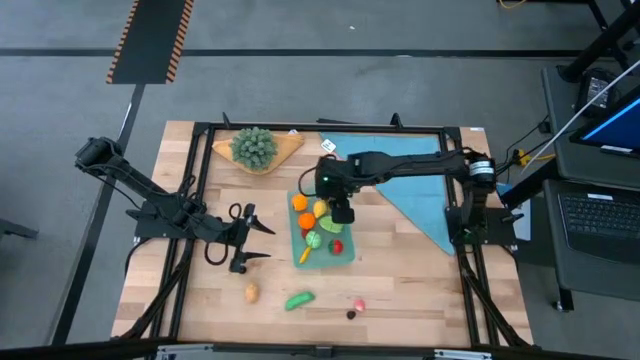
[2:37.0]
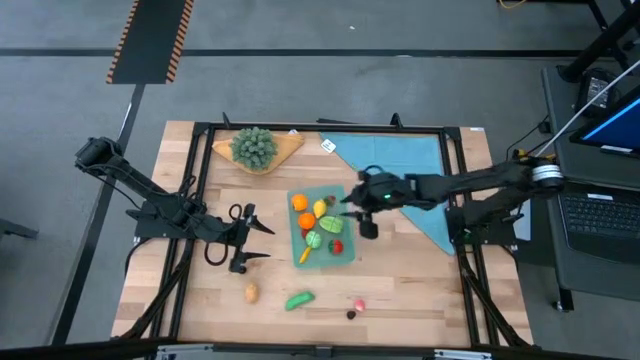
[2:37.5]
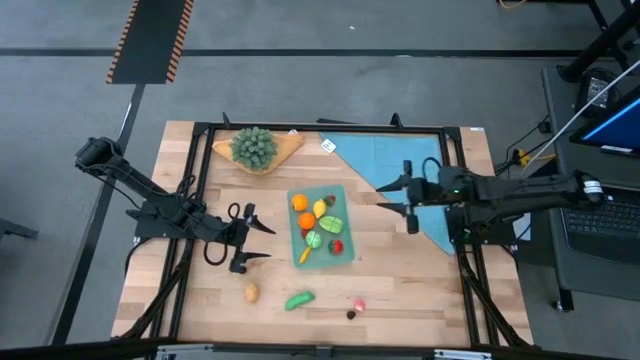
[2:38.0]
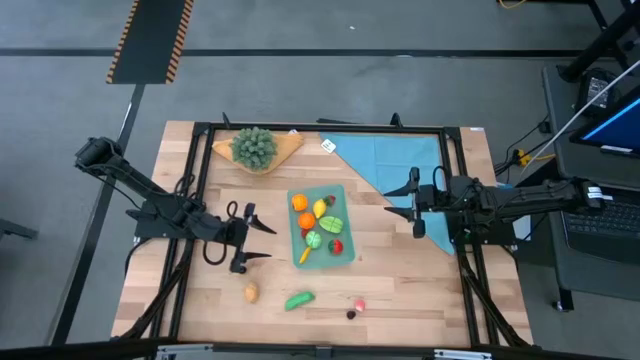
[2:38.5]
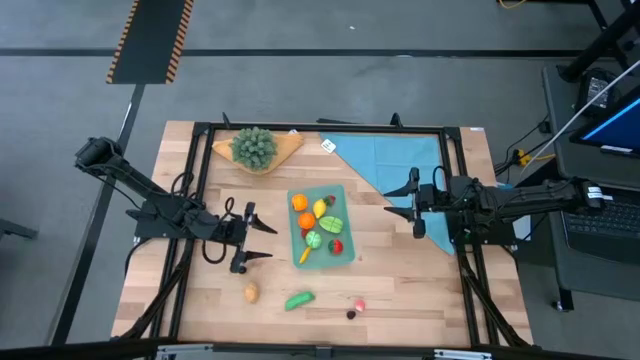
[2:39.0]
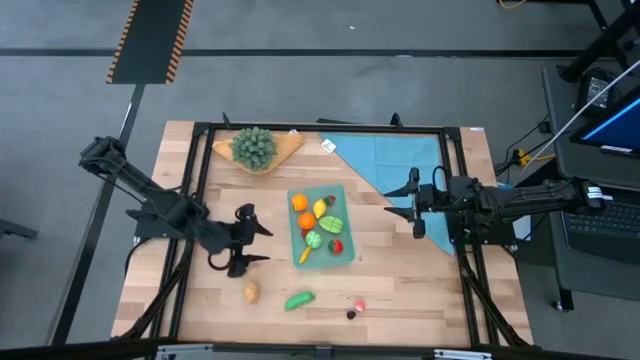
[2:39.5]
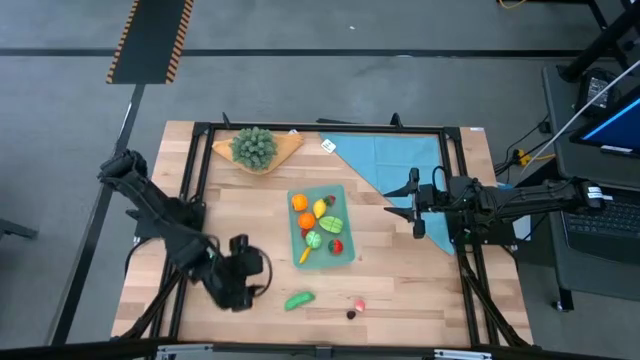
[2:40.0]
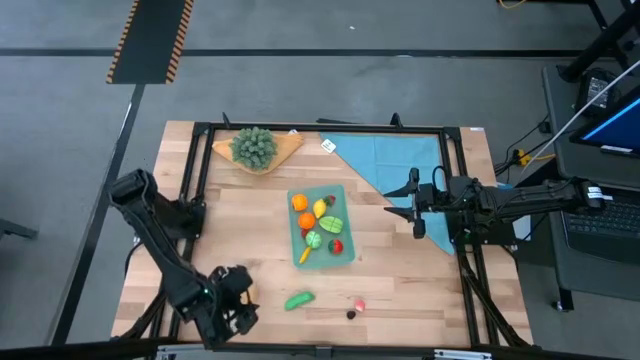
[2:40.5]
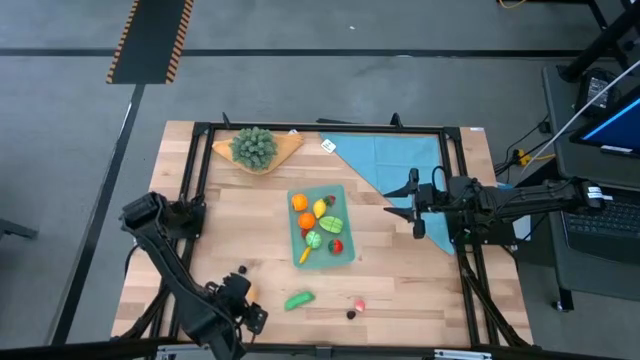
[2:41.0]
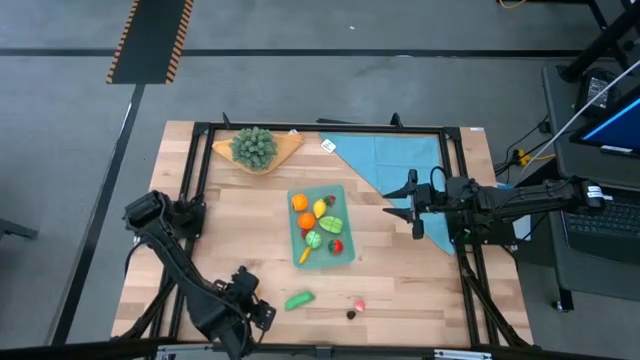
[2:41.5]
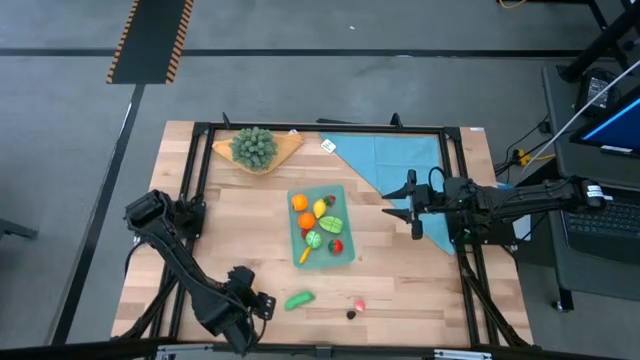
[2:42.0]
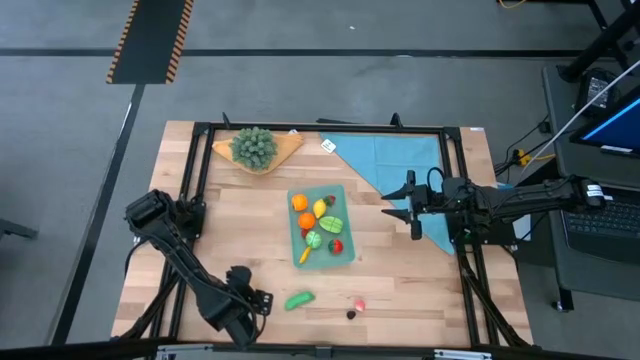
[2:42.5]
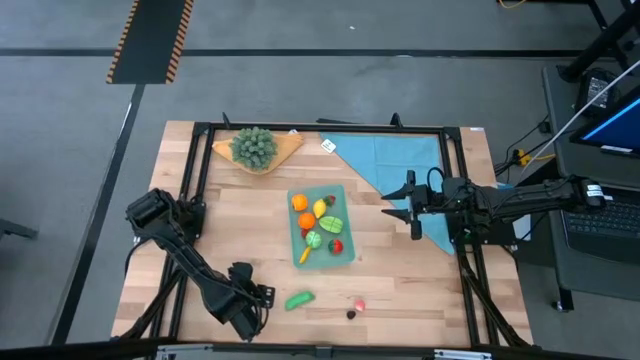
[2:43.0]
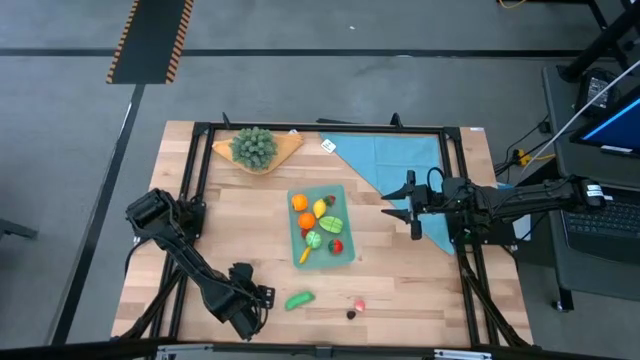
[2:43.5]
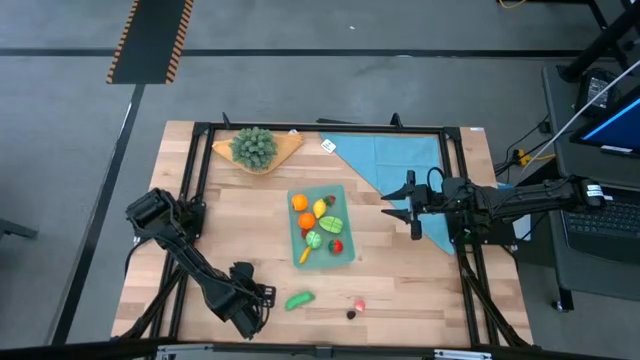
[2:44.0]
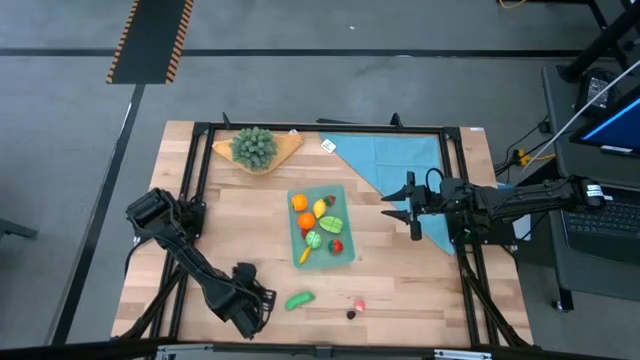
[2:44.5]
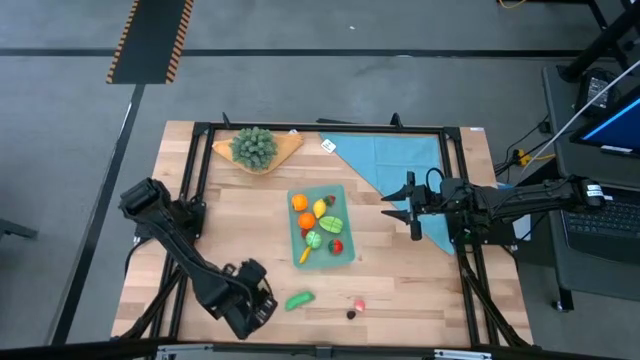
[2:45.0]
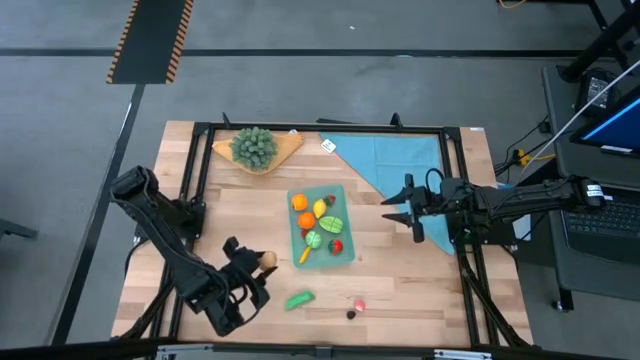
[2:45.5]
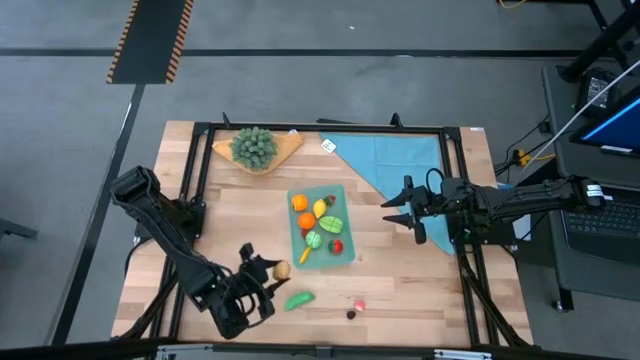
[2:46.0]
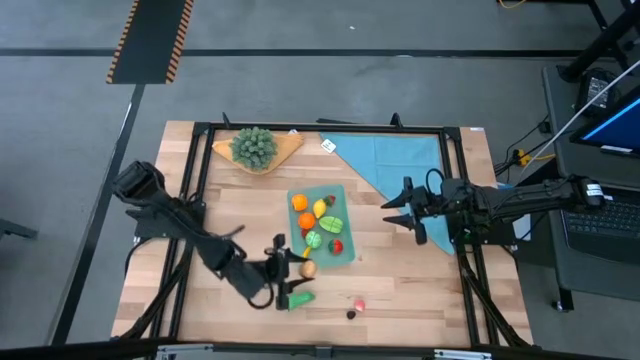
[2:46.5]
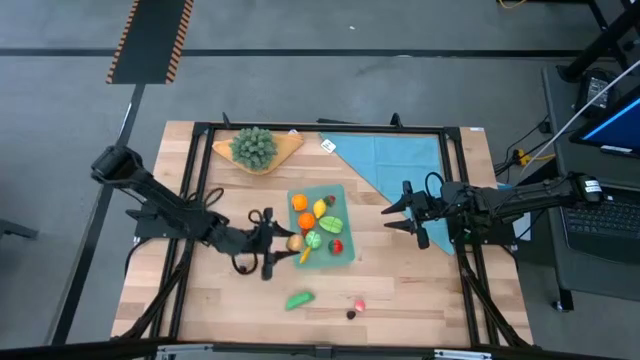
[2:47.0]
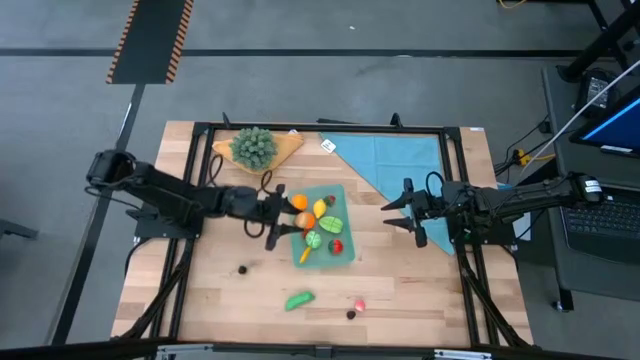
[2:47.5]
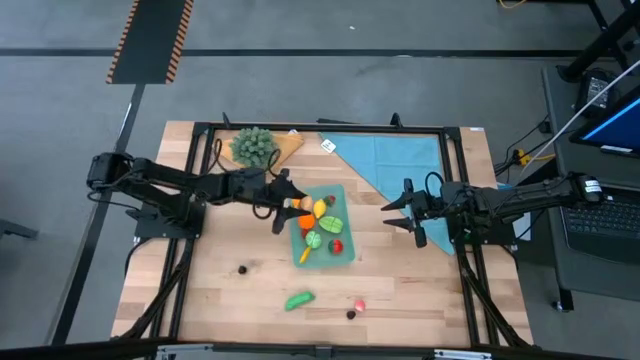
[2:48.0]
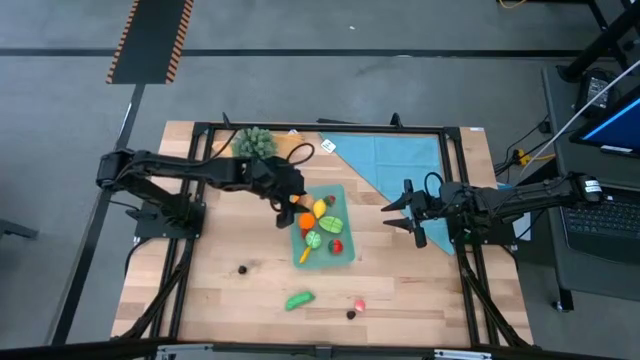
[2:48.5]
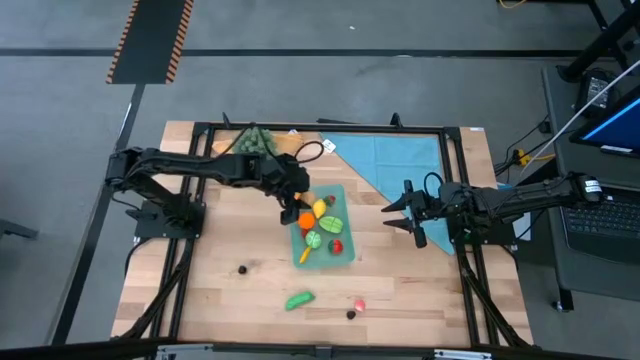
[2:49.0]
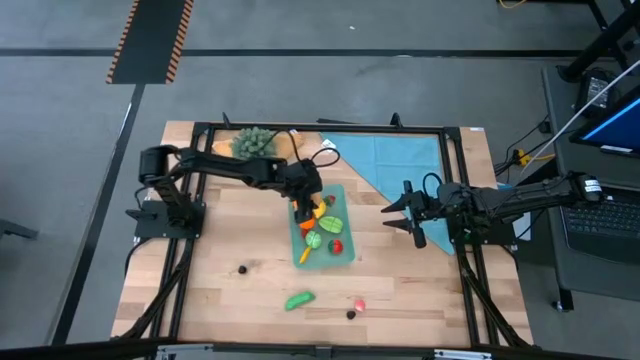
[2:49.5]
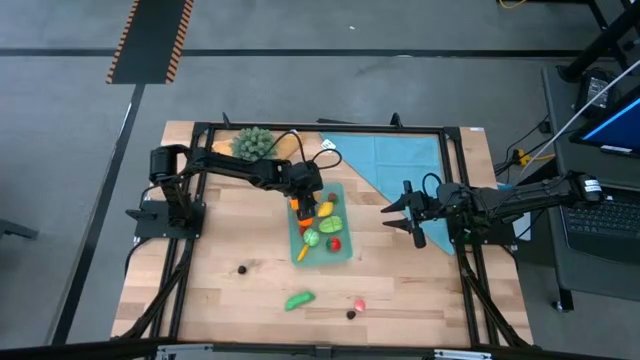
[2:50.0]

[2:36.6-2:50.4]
Task: Pick and placing Produce into tupperware
Put the potato into the bin

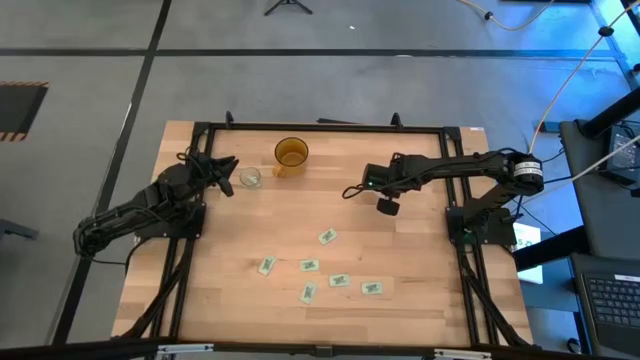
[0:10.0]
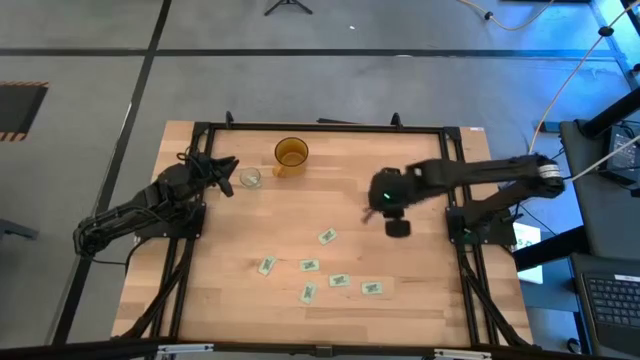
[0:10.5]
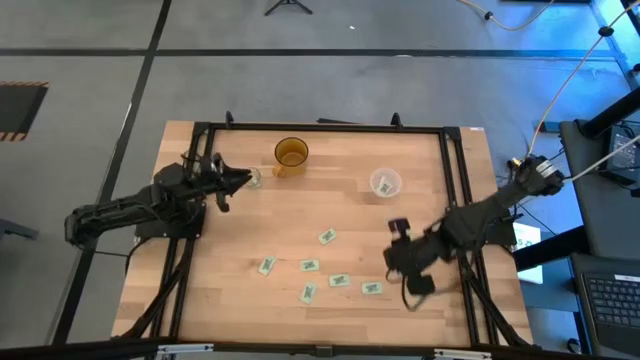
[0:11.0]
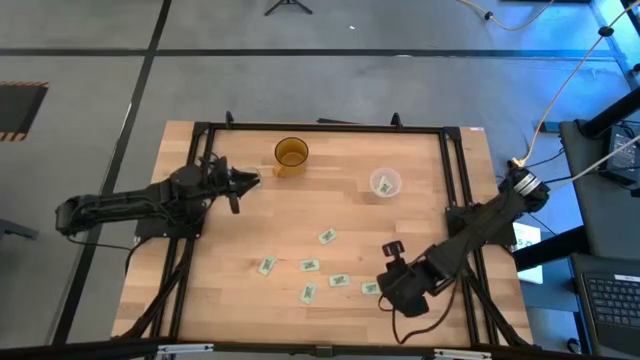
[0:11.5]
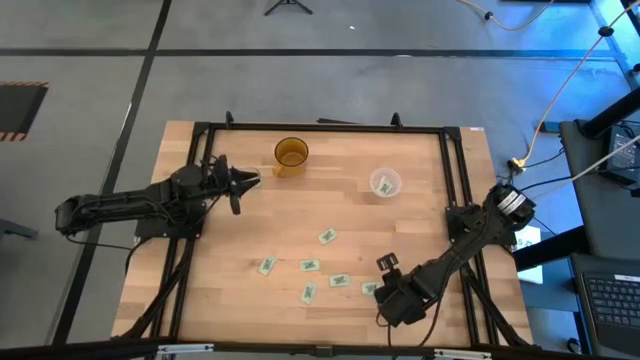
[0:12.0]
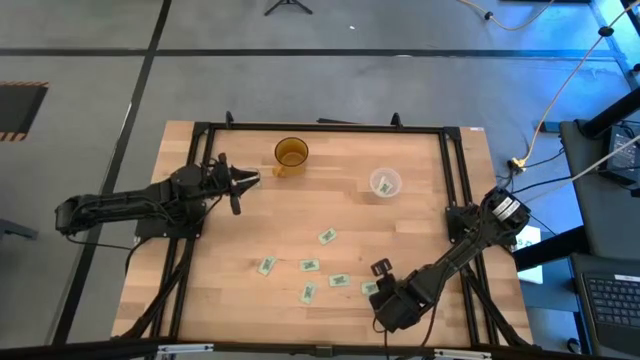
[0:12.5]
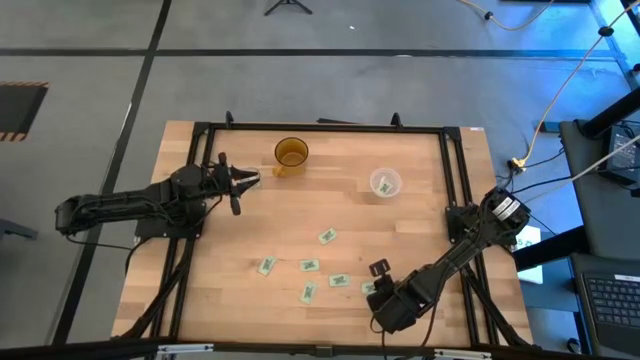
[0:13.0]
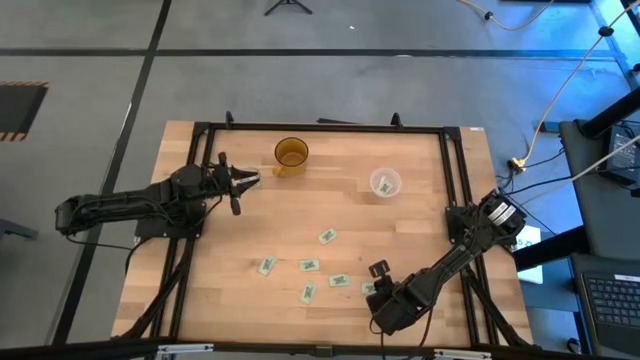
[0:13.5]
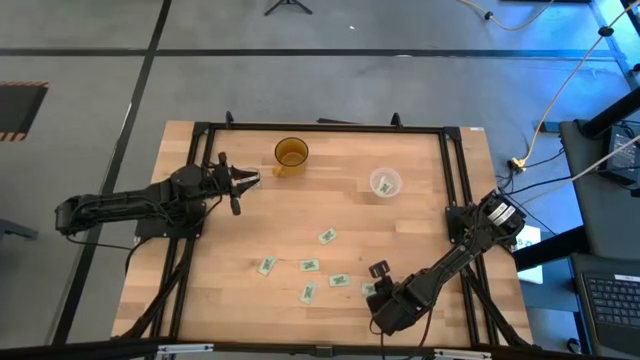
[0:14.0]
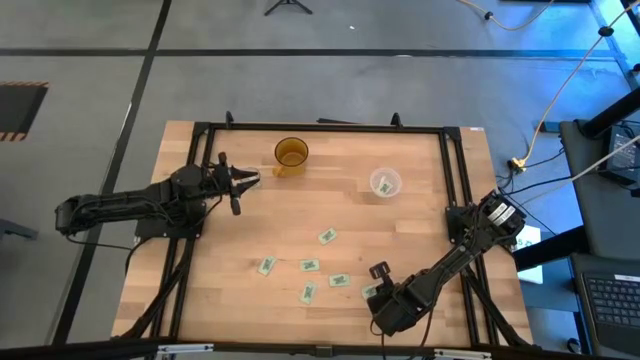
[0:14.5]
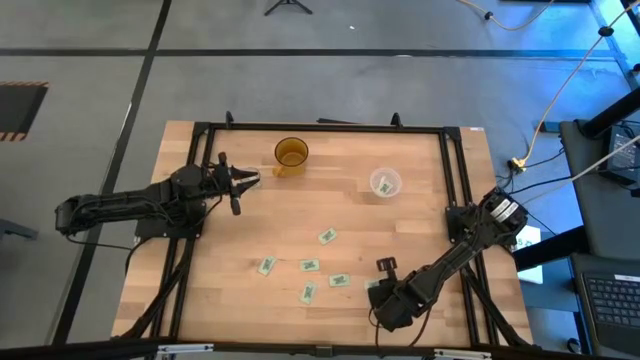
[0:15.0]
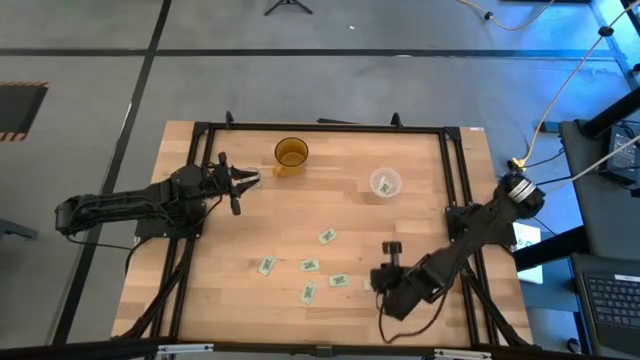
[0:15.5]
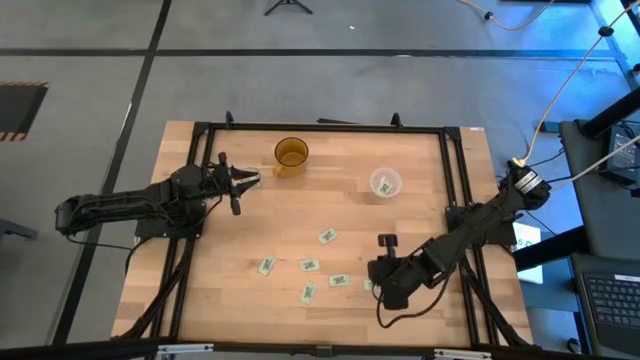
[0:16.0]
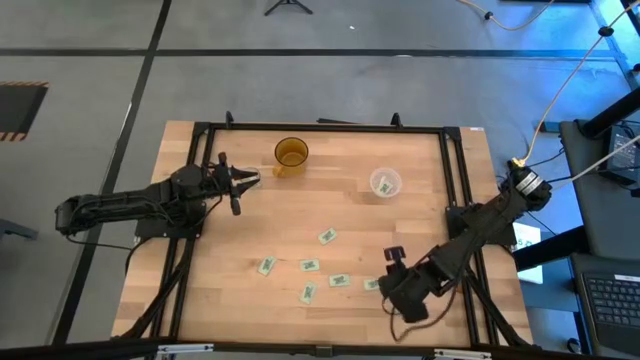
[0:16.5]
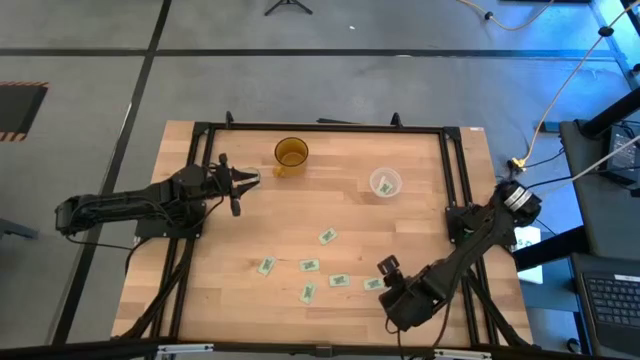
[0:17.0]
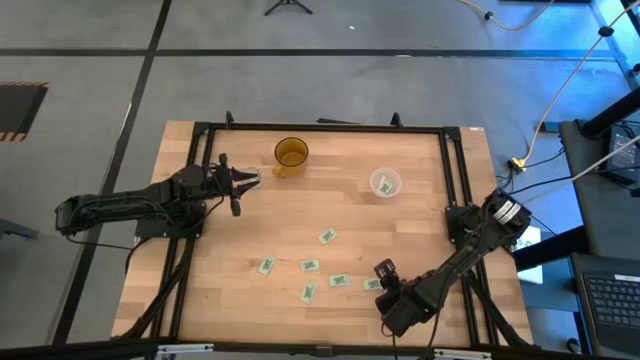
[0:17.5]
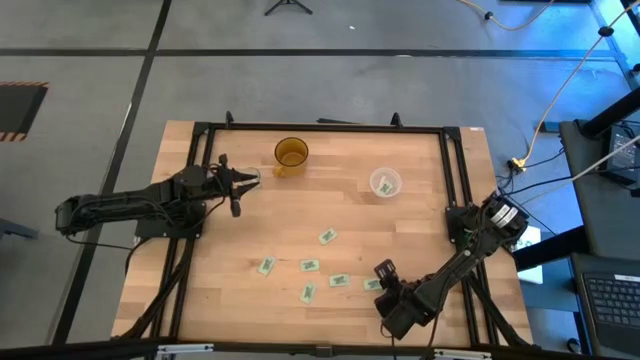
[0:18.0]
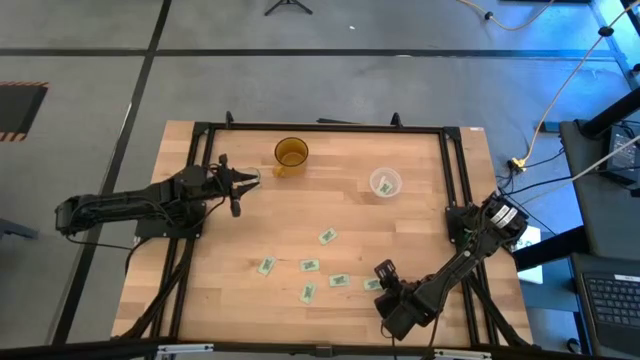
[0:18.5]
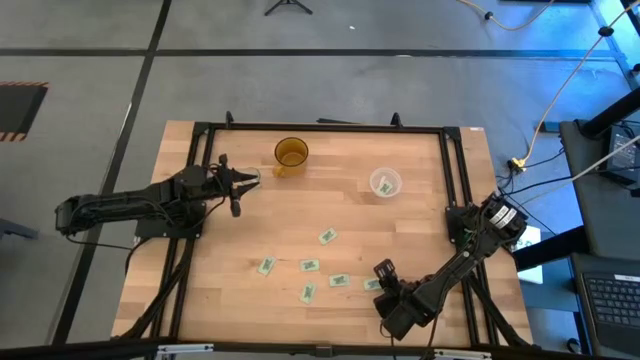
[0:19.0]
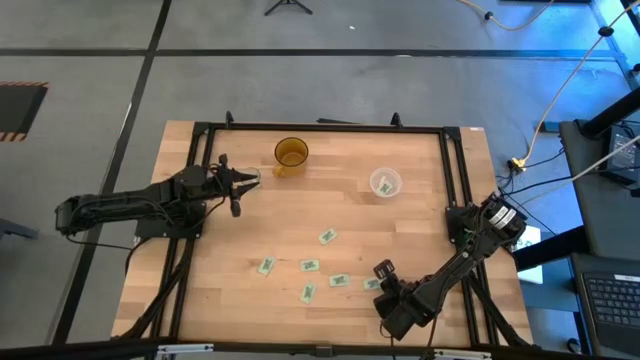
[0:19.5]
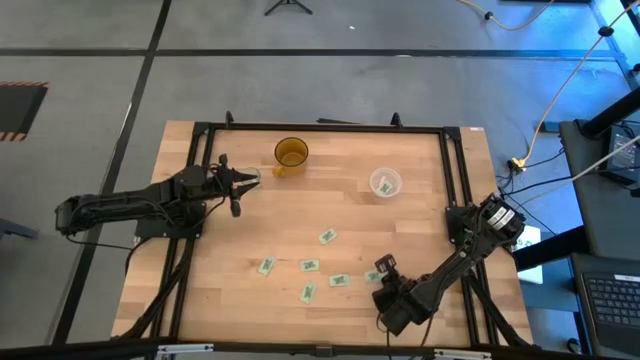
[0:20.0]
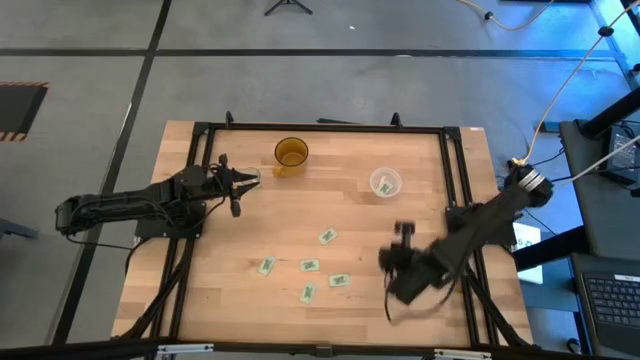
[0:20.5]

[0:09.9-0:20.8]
Task: Pick and place Stevia / Truvia into bins
Put the stevia packet into the transparent container
